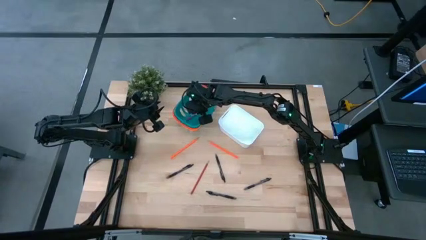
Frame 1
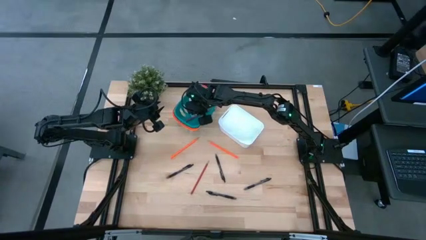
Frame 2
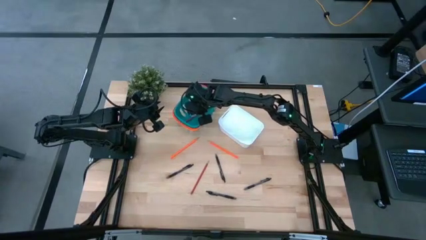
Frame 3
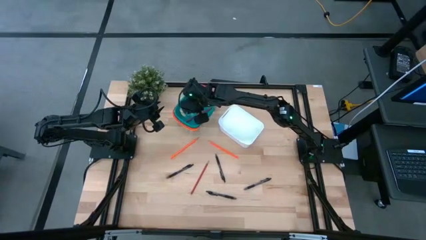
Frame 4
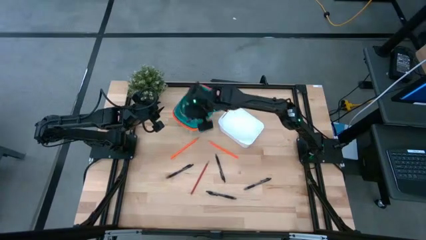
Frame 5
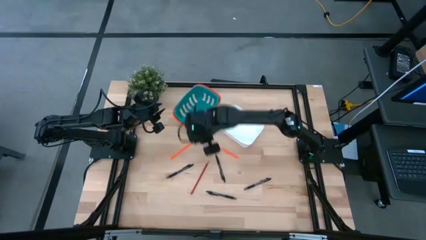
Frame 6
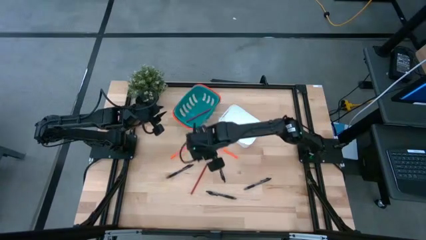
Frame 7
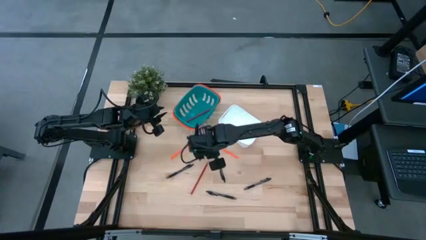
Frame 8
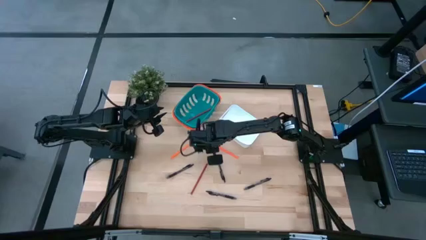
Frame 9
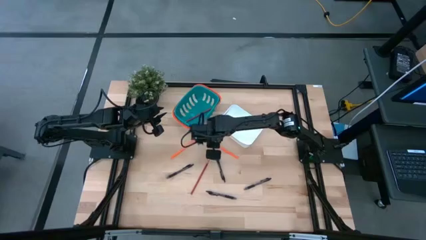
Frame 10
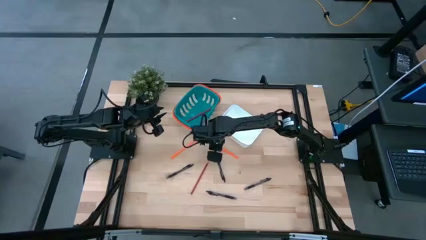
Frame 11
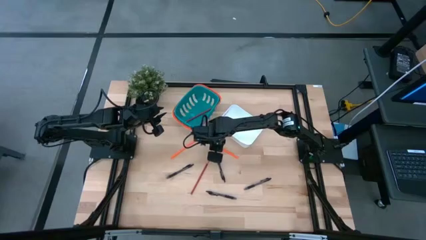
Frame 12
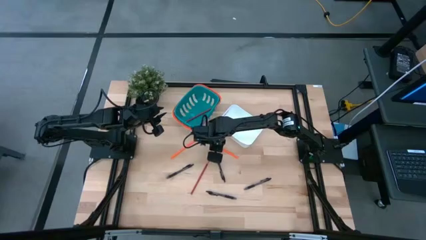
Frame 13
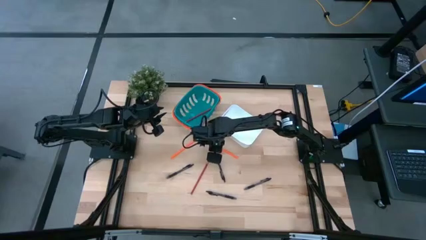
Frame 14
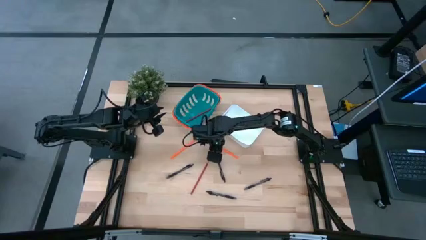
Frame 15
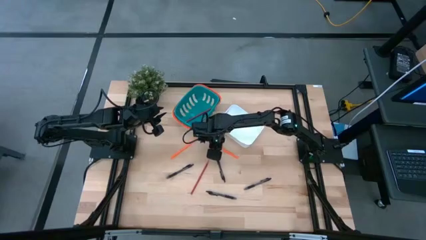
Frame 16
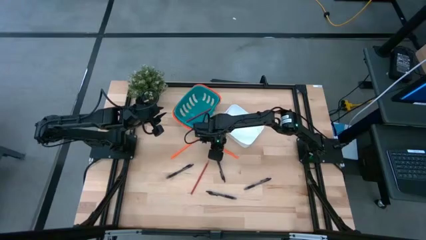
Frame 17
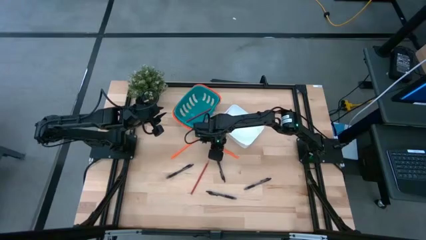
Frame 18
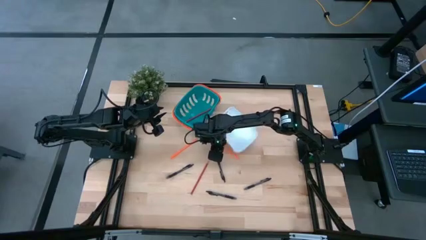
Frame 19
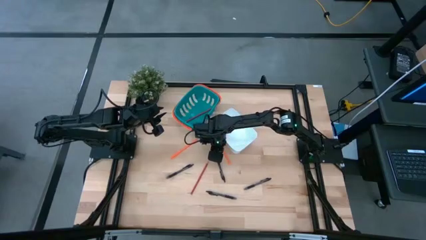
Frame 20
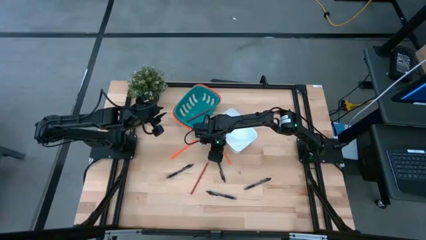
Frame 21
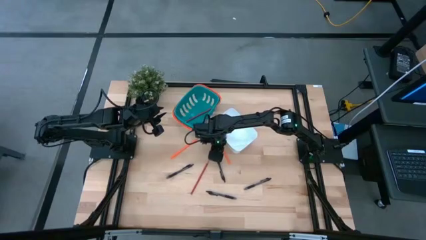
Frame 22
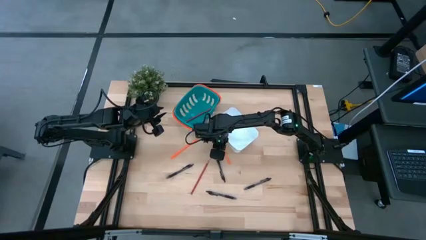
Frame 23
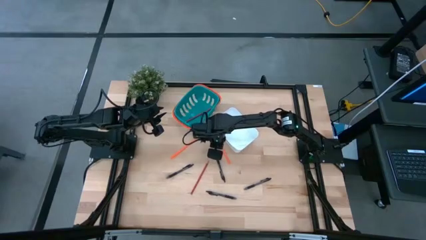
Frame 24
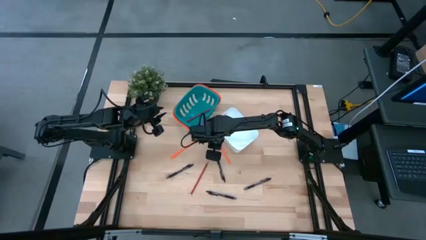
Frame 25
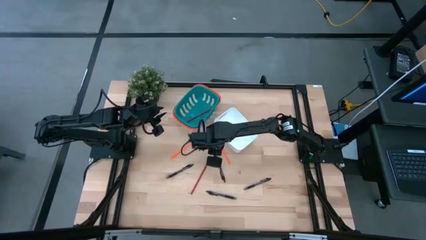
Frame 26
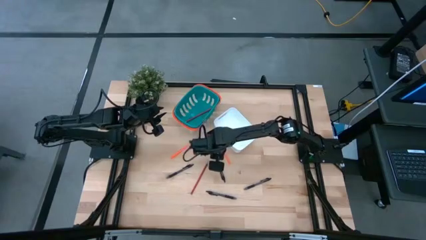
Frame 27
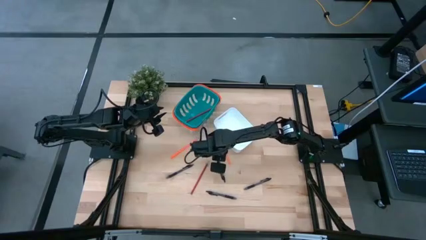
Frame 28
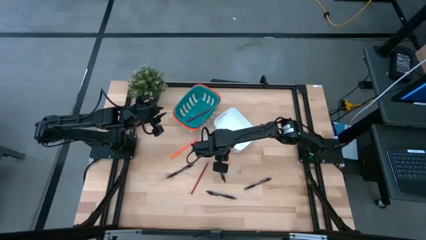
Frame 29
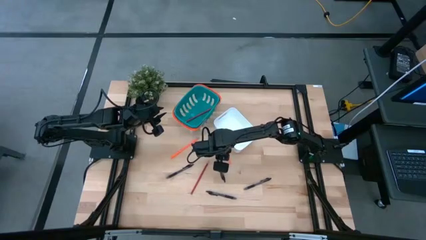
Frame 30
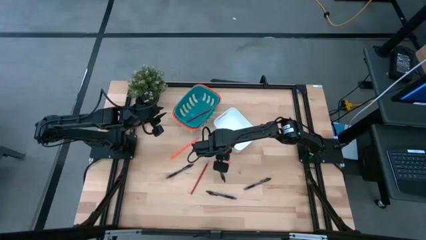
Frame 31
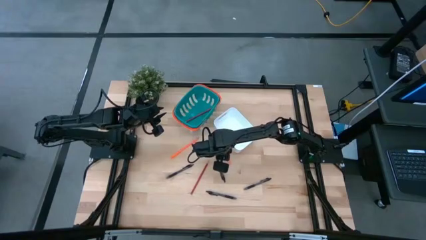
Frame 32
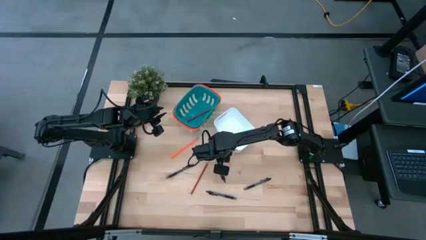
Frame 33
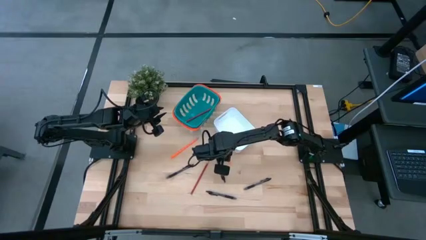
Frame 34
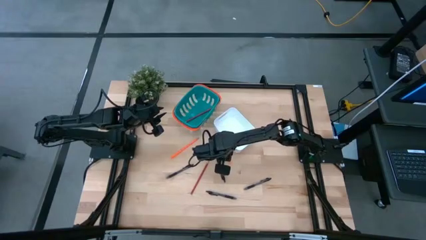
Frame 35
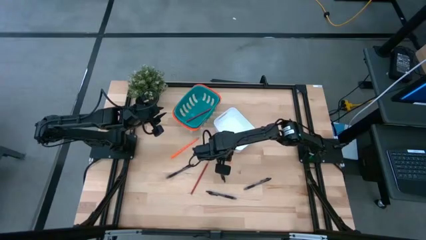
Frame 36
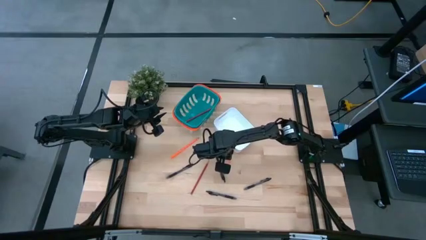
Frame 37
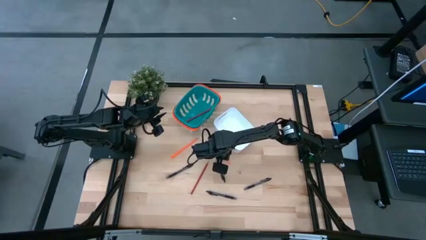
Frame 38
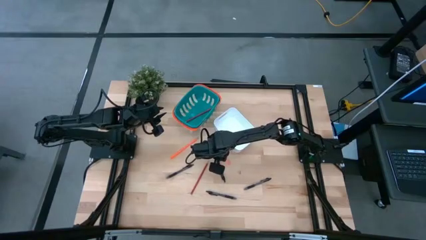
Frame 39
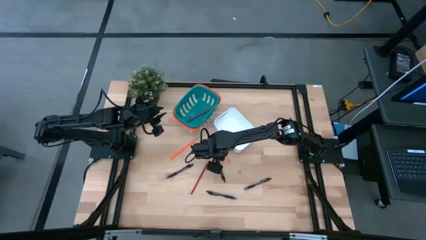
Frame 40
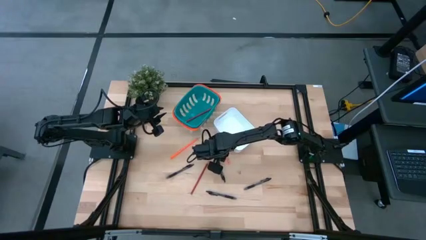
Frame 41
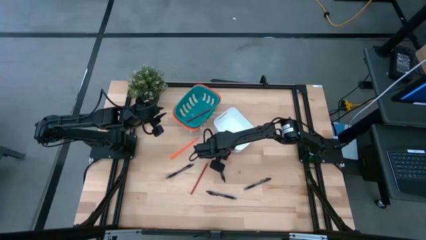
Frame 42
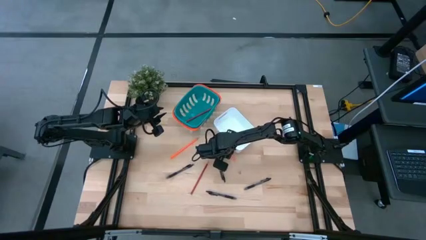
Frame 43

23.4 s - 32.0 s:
Task: Sort pens & pencils
Adjust the left orange pencil

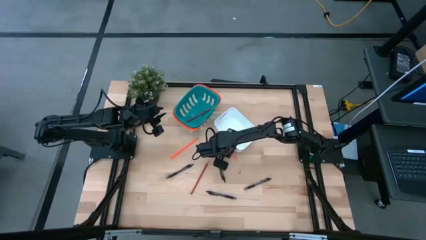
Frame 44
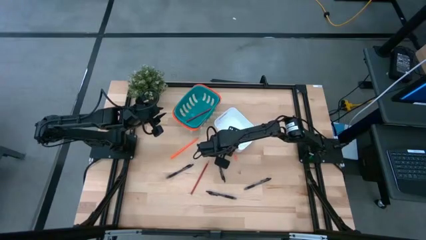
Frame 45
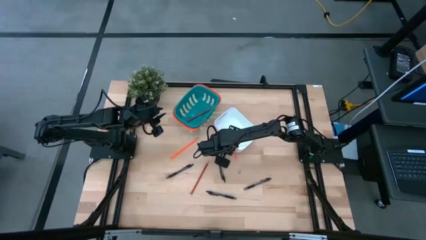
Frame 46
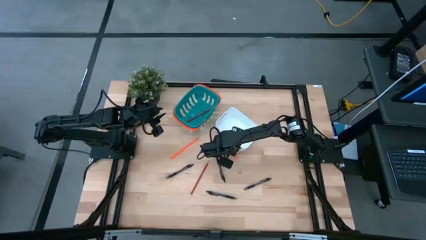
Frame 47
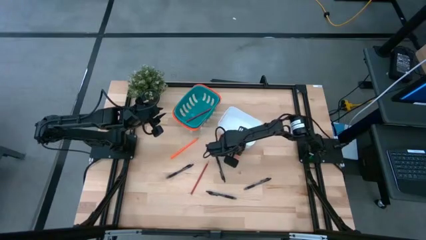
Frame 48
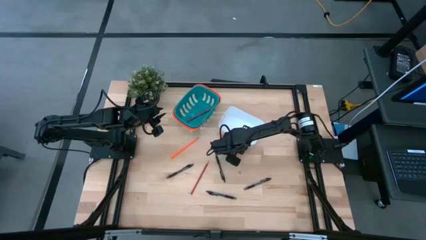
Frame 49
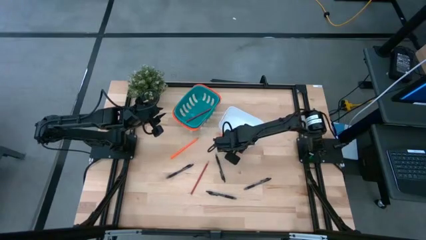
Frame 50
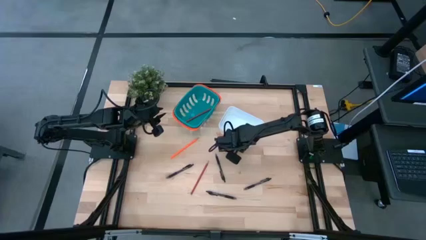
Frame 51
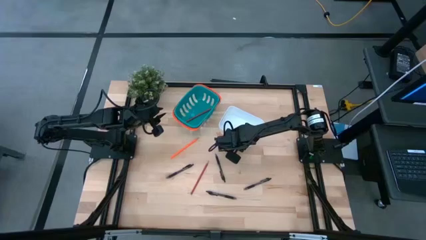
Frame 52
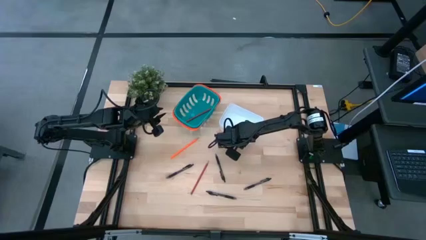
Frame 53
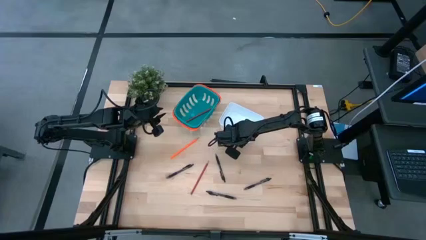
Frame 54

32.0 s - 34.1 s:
Adjust the white bin

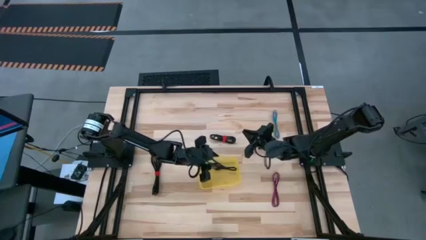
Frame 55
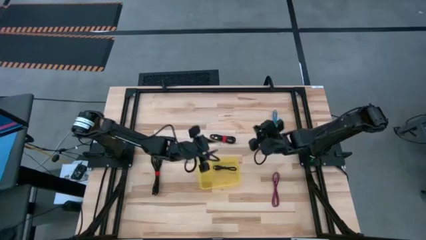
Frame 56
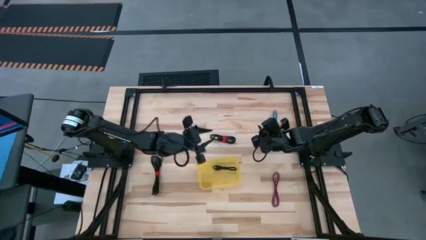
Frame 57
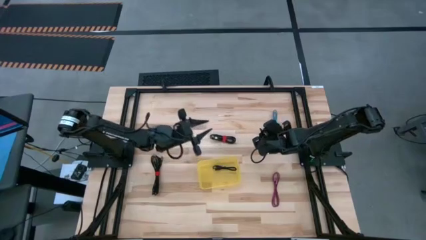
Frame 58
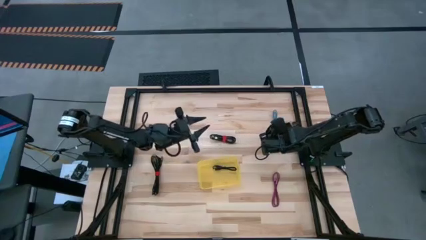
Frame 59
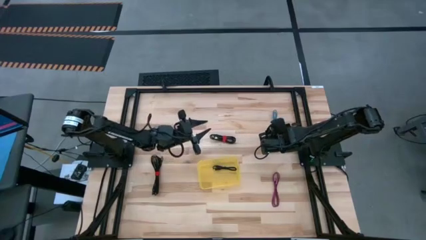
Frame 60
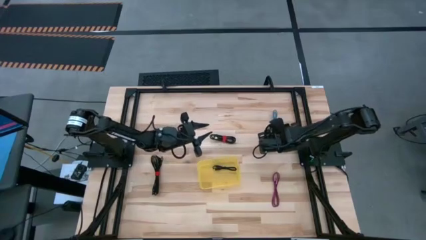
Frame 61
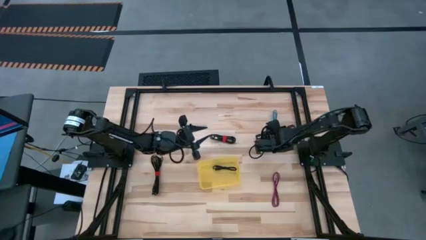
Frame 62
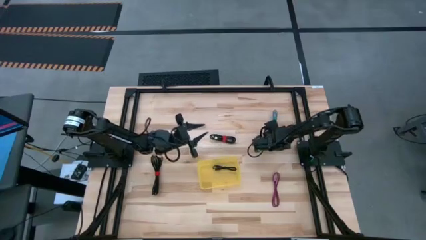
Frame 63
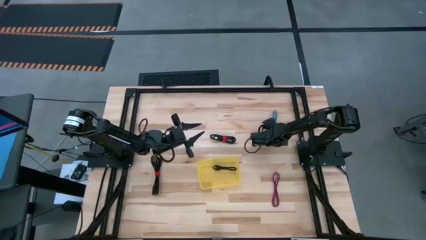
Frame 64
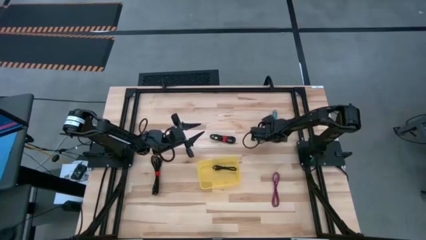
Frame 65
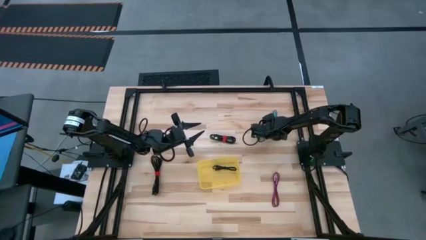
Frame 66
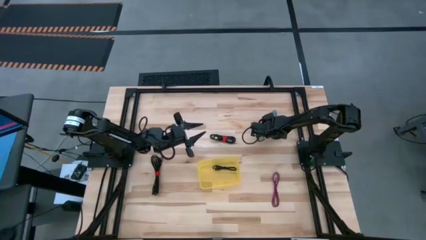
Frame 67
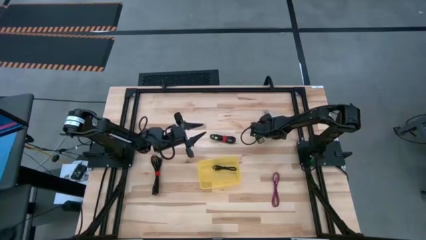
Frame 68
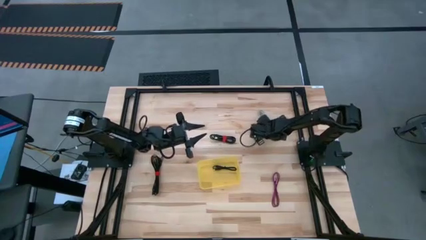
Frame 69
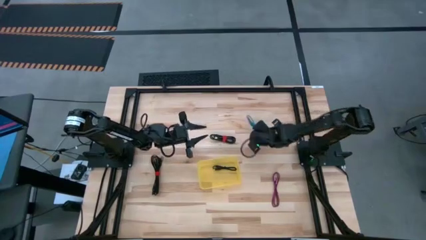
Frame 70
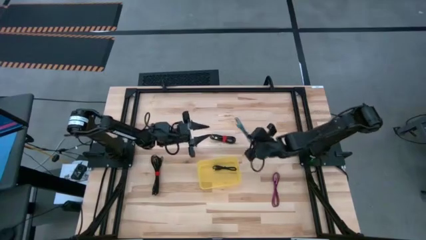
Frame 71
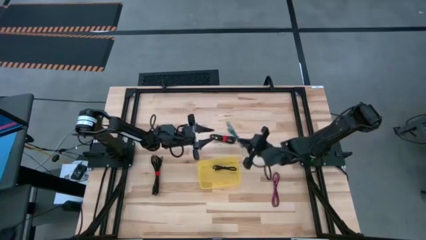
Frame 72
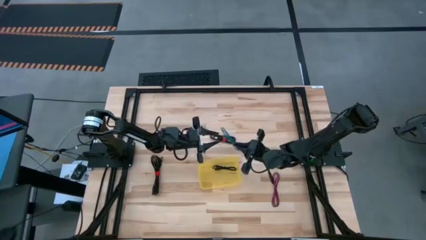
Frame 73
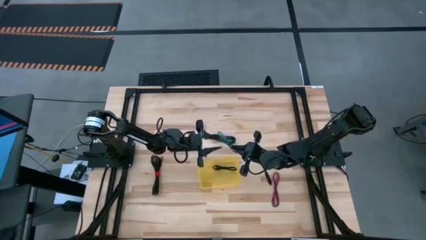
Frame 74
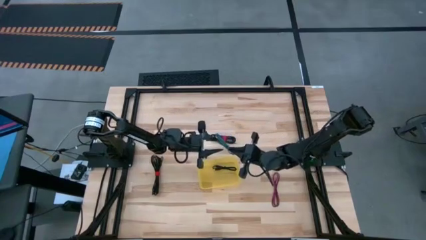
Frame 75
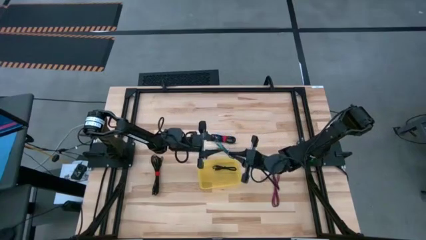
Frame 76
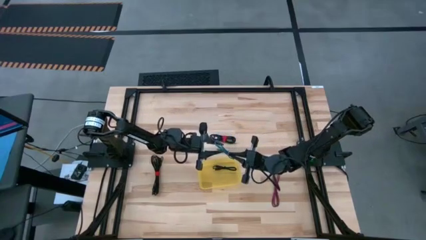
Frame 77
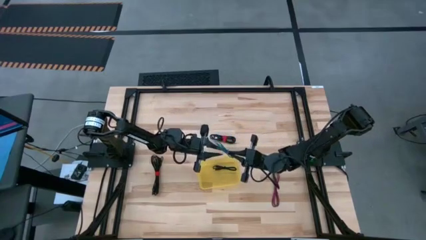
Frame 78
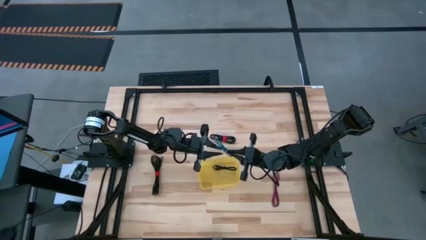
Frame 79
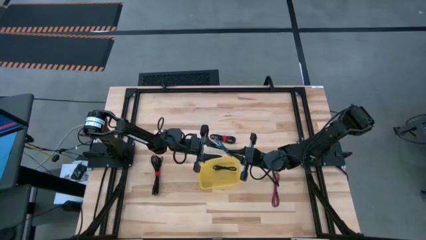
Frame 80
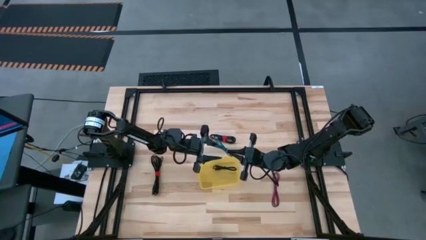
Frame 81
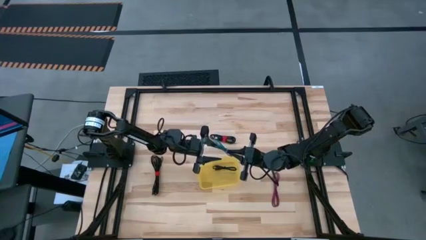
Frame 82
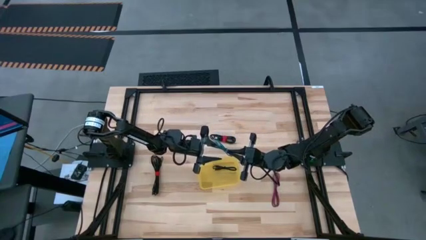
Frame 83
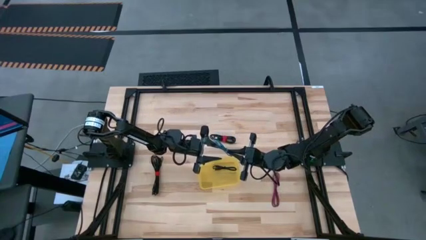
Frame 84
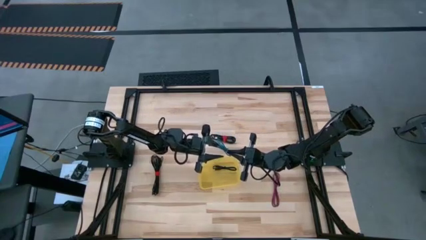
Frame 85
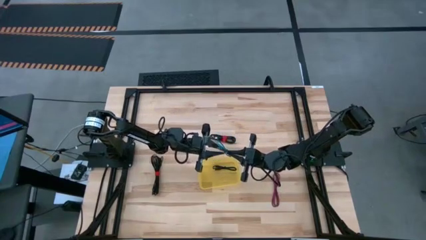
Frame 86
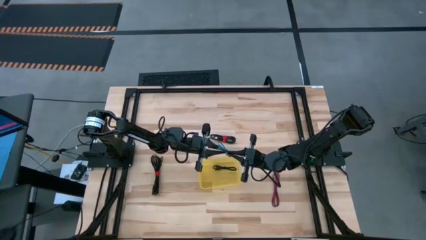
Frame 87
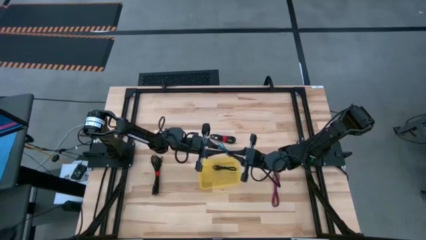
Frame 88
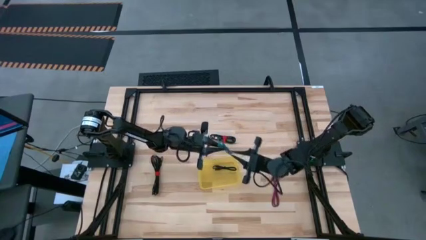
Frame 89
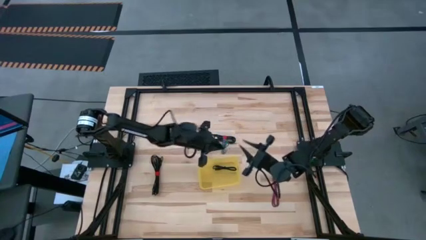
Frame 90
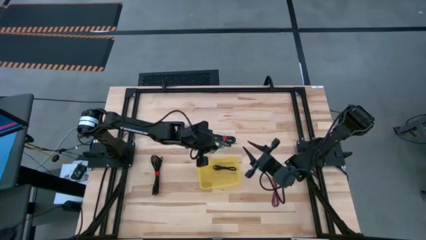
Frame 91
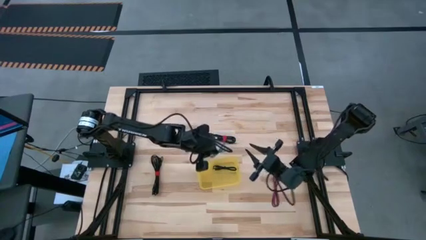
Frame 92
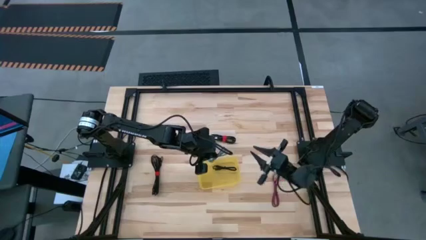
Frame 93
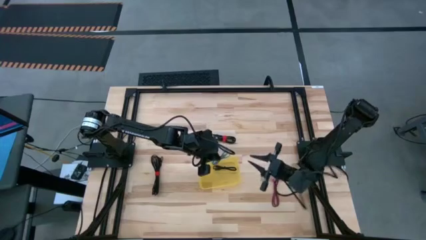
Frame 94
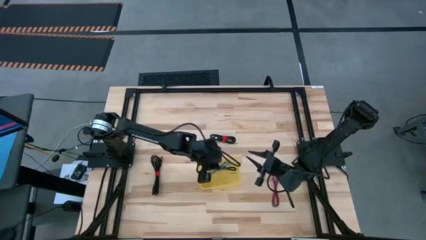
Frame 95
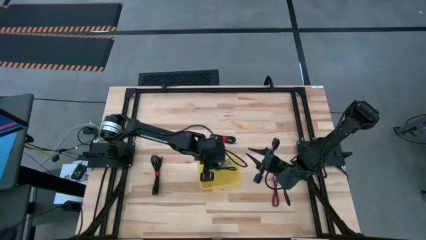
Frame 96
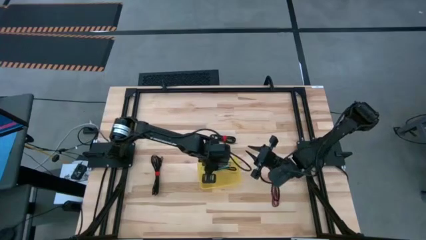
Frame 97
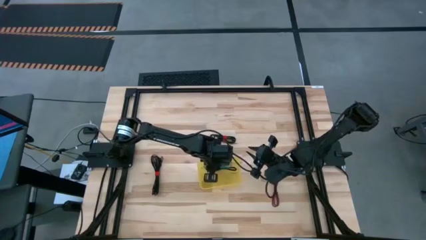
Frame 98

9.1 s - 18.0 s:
Task: Pick and place USB-C Cables
Put the blue charger cable into the yellow bin
